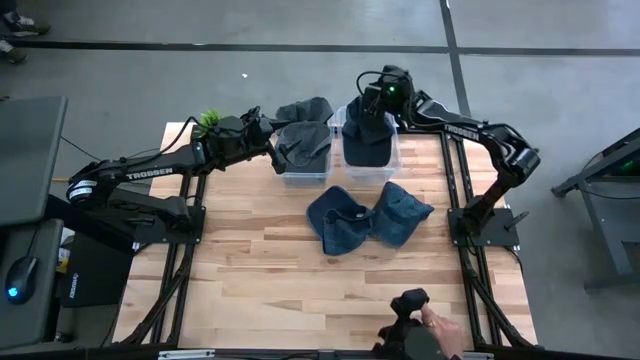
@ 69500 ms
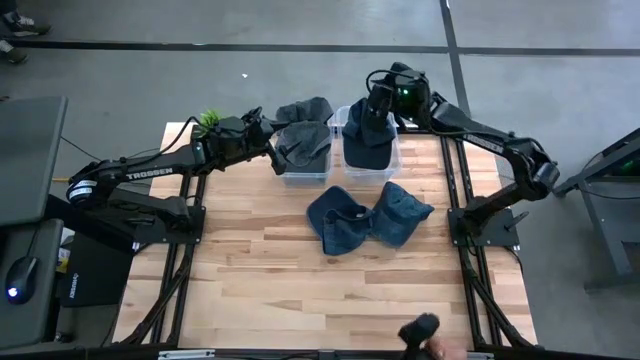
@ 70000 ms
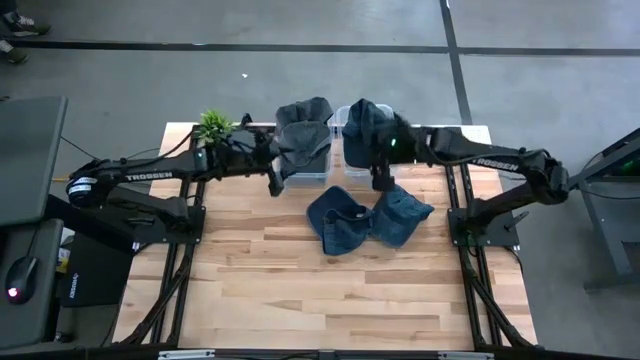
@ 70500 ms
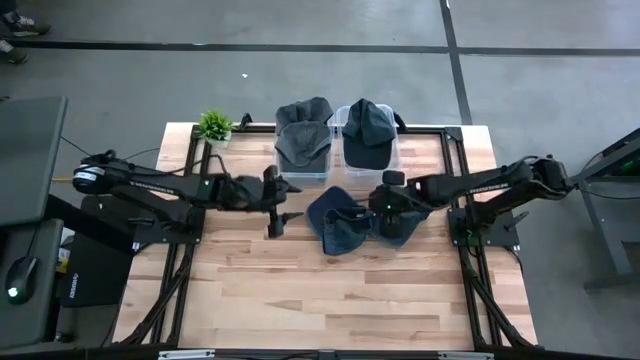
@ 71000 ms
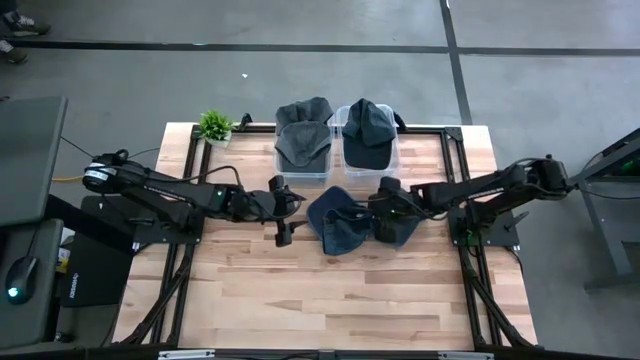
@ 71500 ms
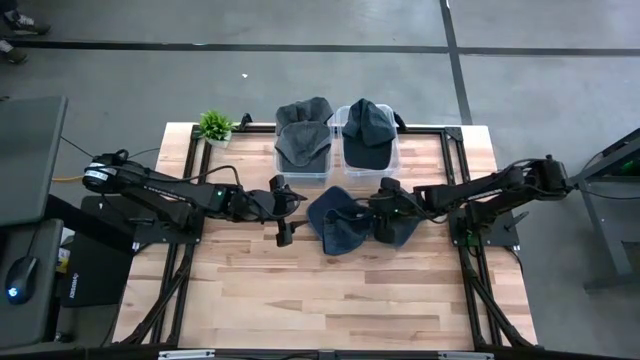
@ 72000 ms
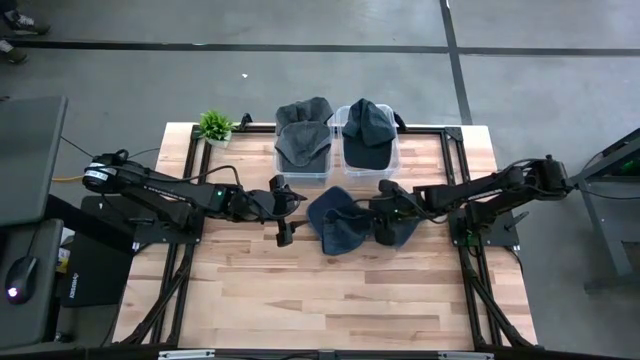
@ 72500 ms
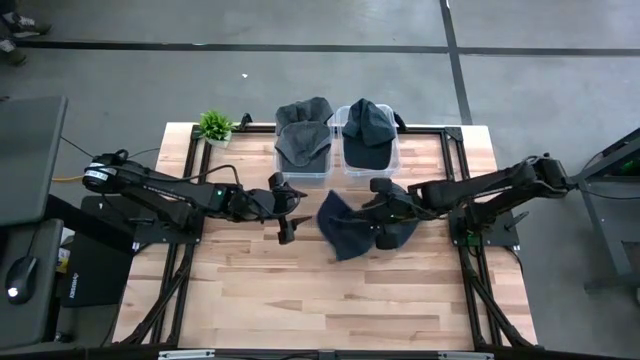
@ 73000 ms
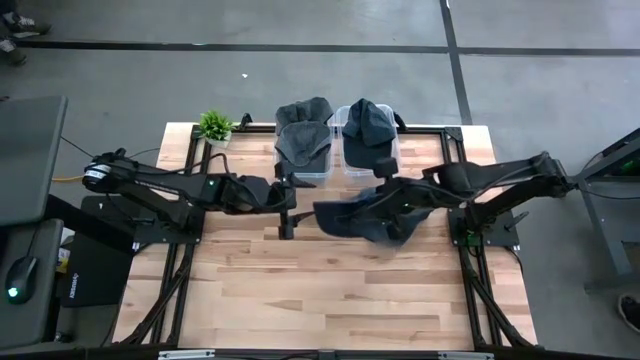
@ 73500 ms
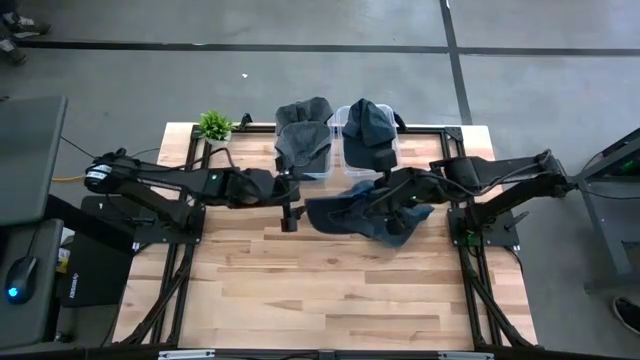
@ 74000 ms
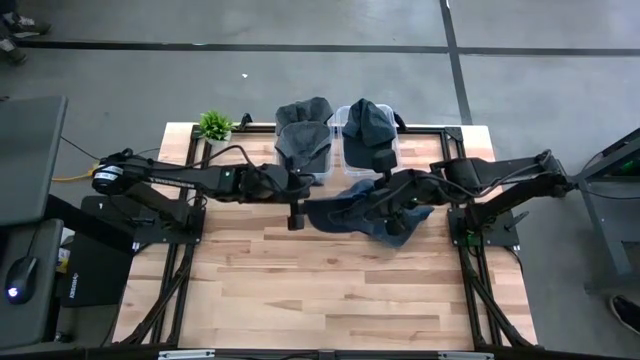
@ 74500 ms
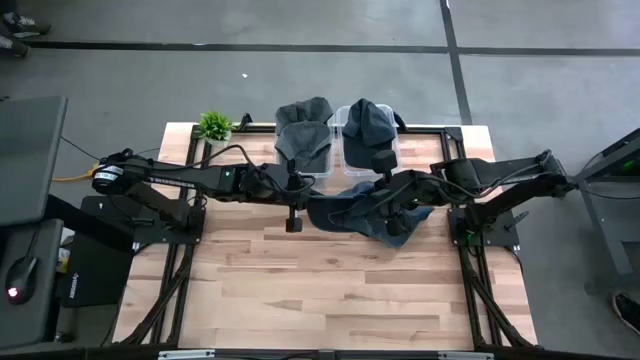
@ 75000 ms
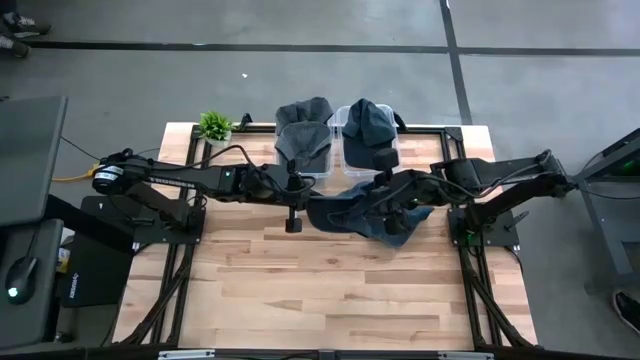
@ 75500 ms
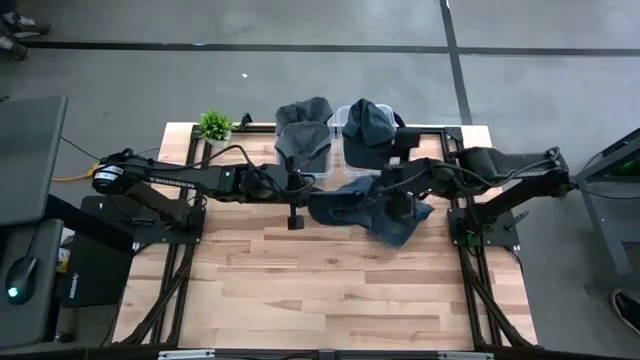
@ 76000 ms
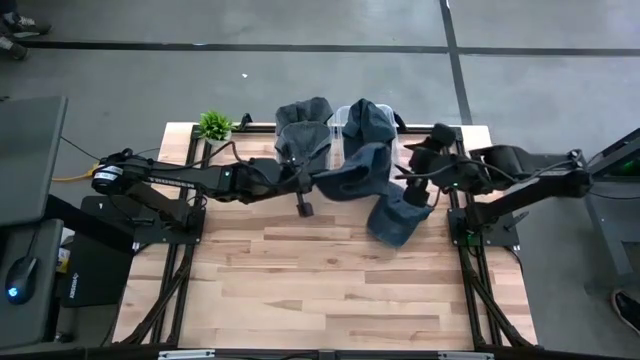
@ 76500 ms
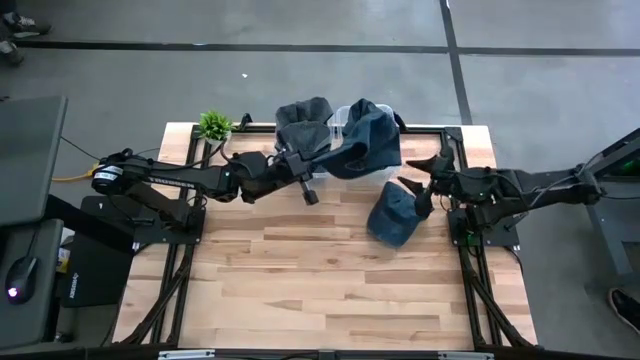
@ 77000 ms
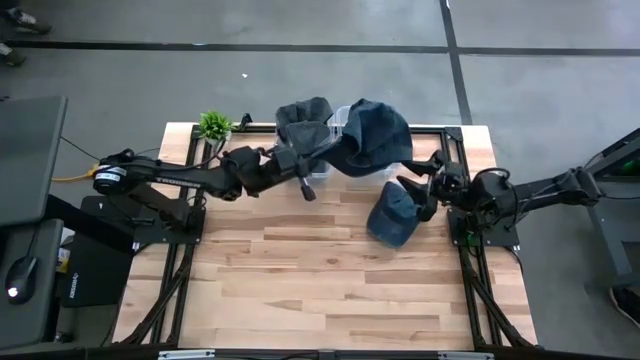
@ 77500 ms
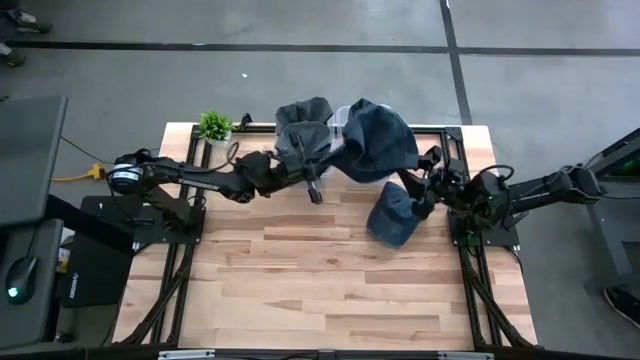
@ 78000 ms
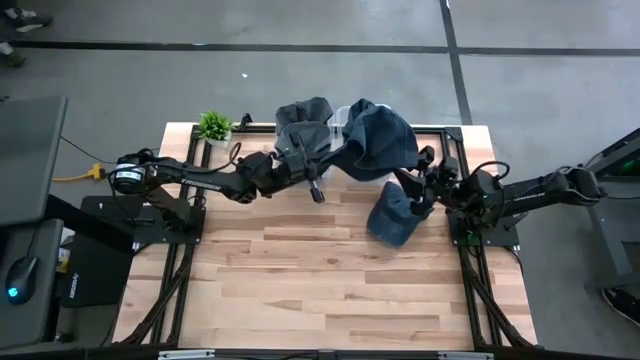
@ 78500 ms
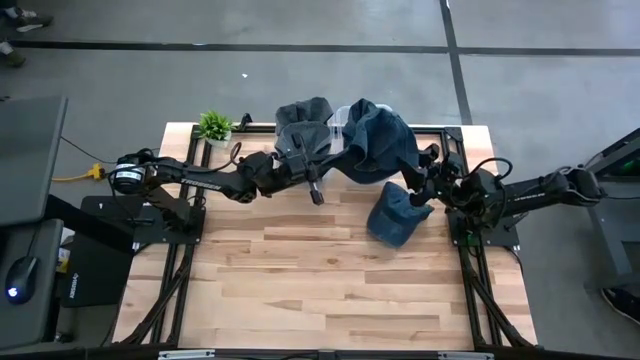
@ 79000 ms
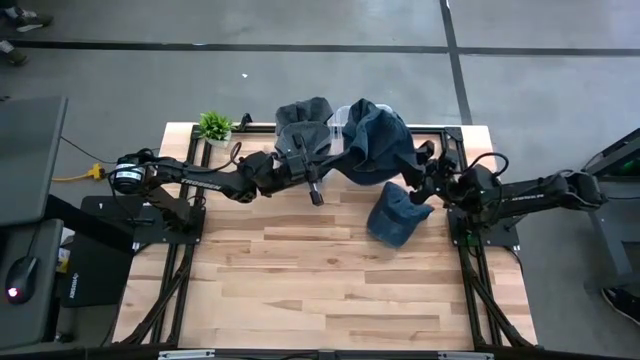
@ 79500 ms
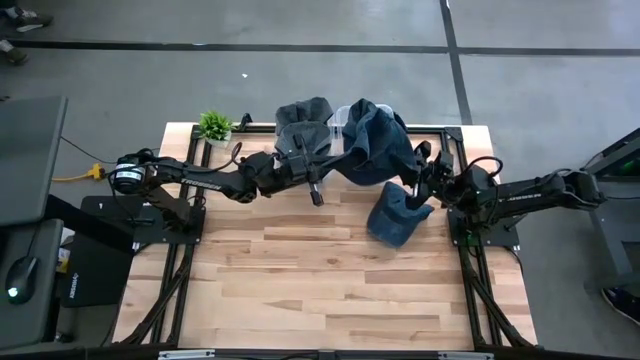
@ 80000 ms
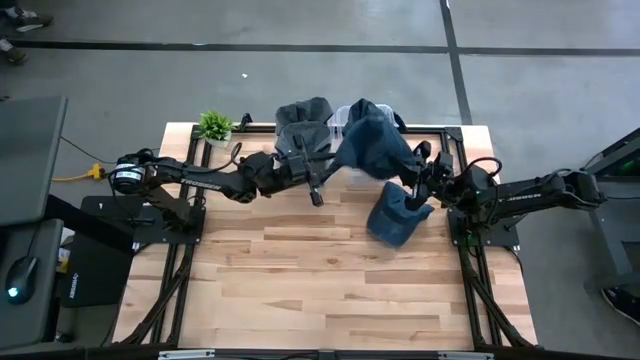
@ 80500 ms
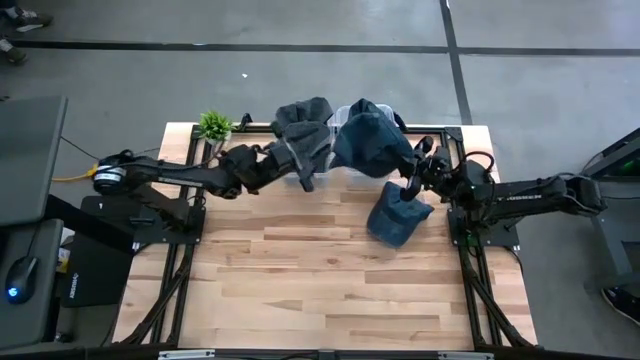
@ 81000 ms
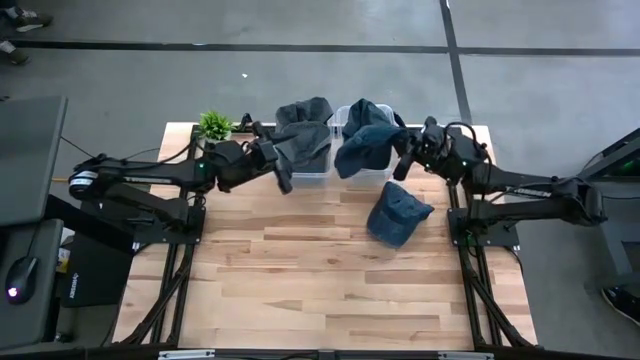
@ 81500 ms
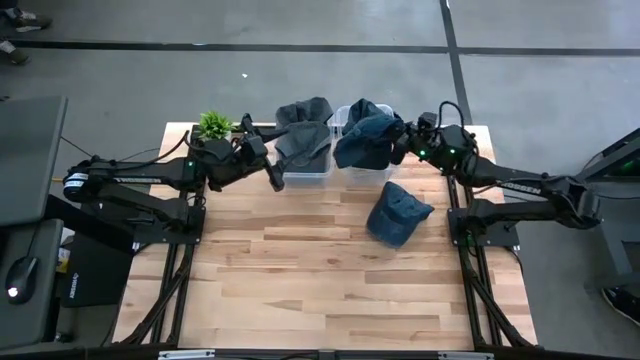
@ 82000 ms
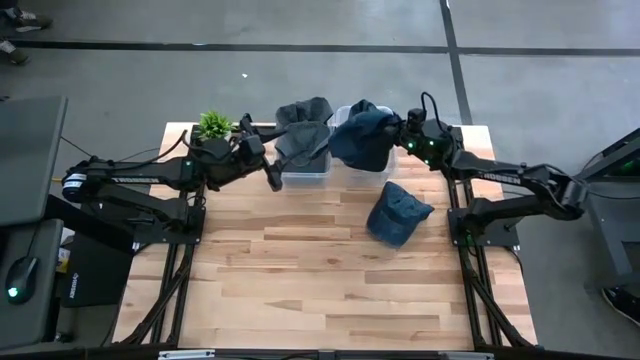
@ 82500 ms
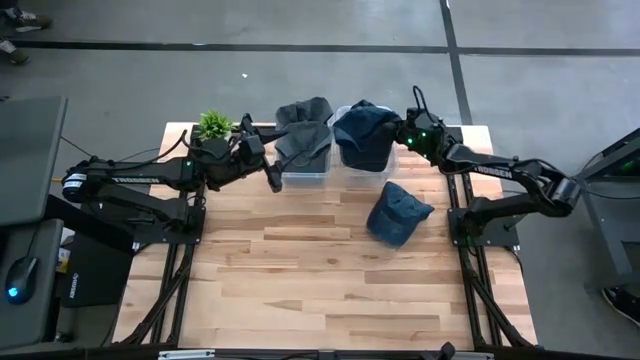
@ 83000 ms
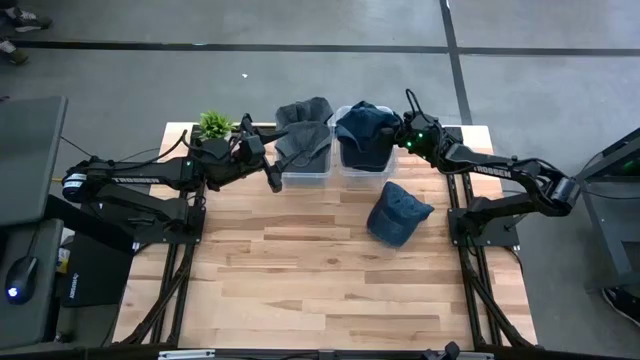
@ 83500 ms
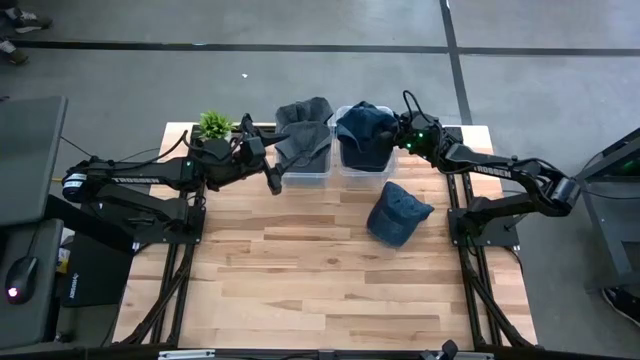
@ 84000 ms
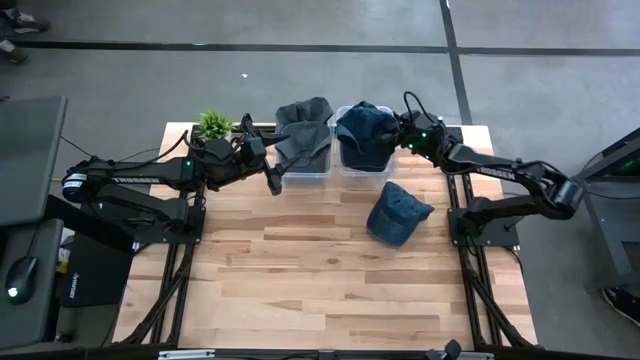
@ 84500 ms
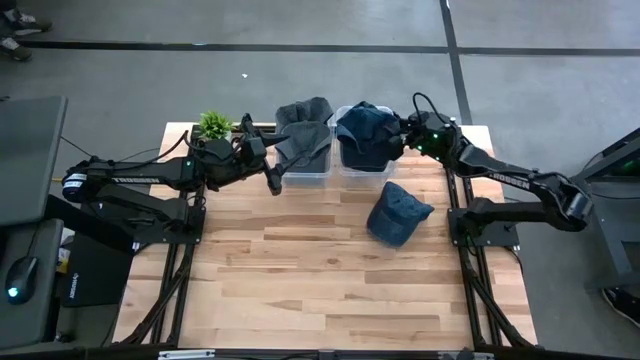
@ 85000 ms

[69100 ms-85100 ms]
Task: Pick & Place hat
Put the middle blue cap into the right transparent bin
